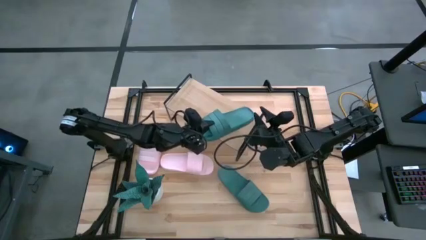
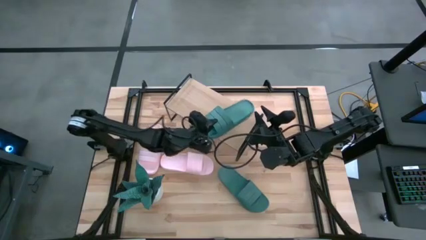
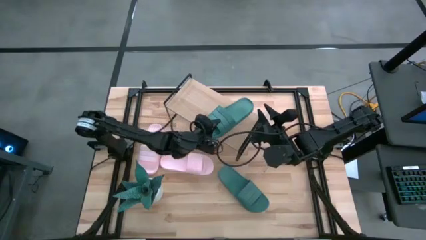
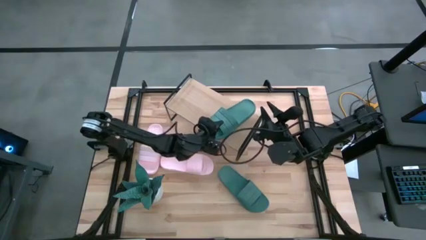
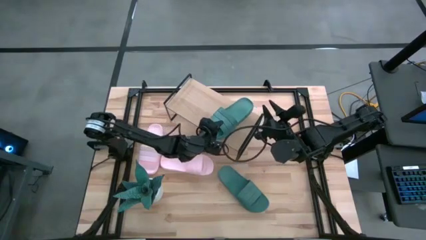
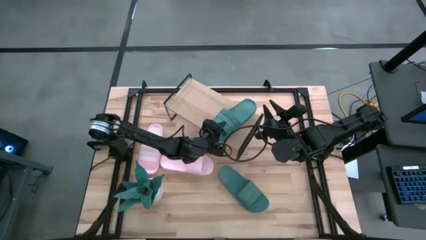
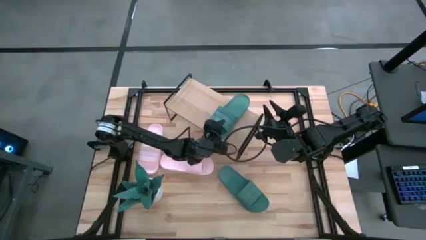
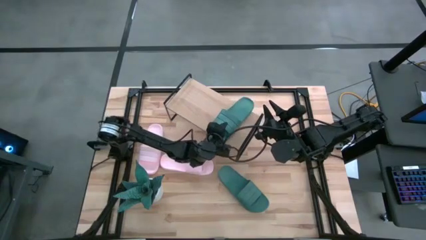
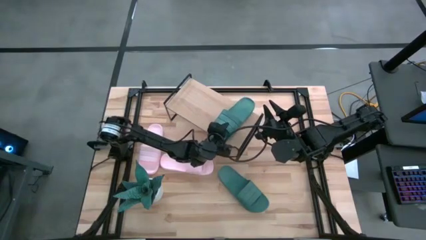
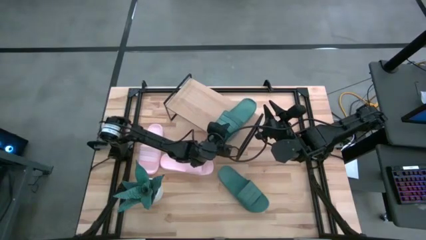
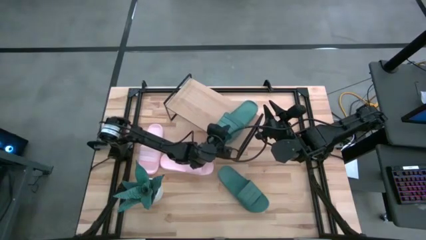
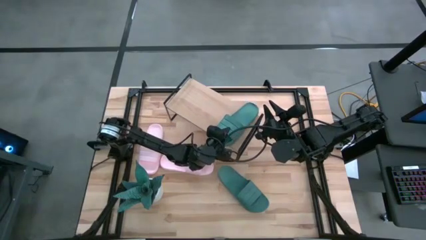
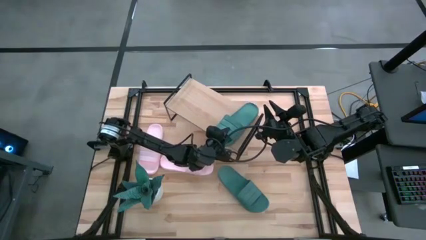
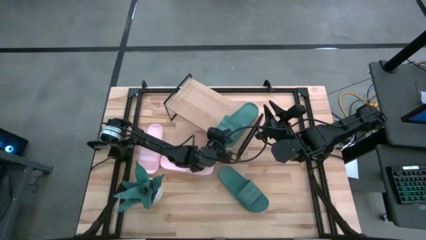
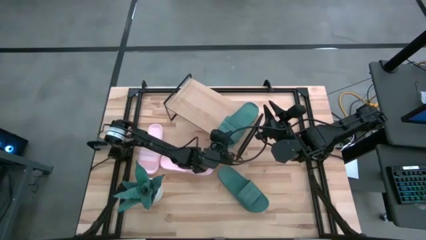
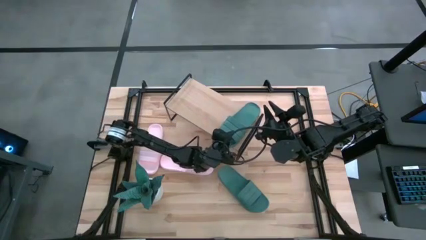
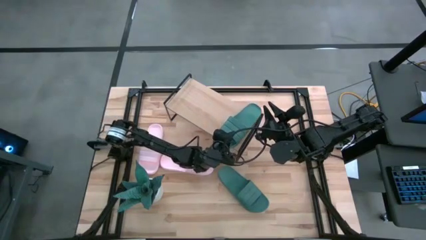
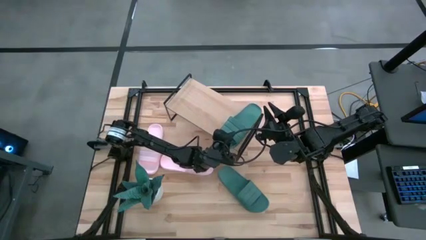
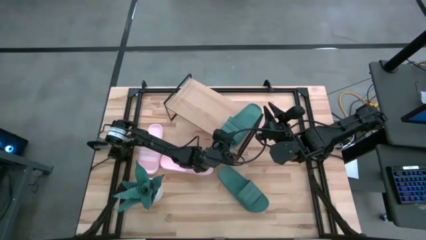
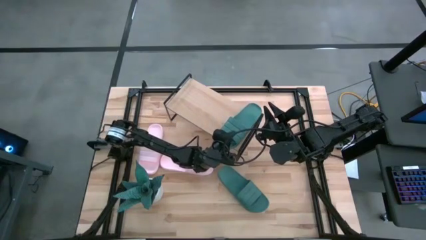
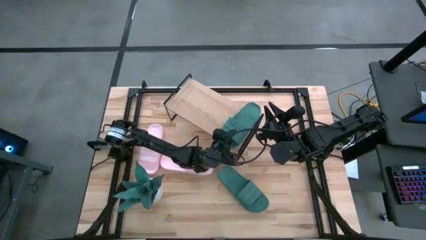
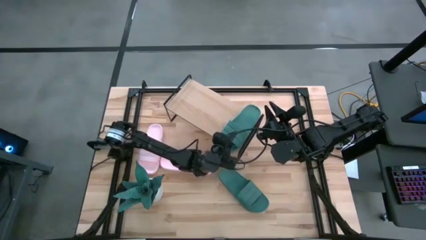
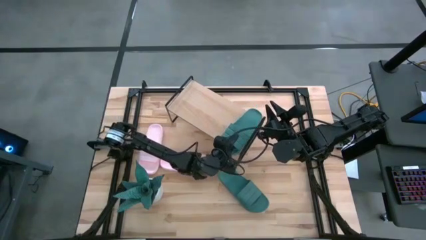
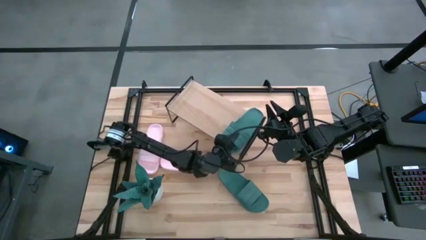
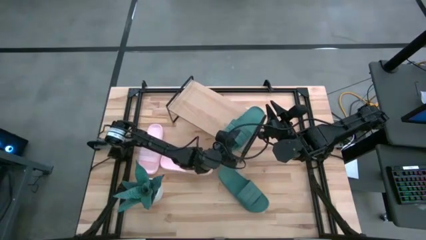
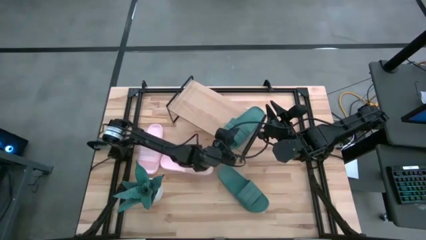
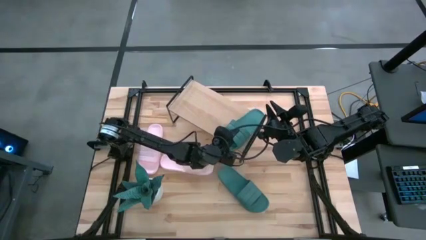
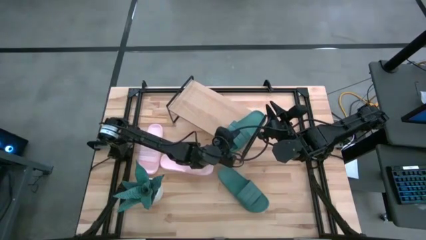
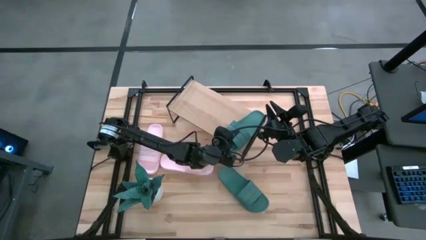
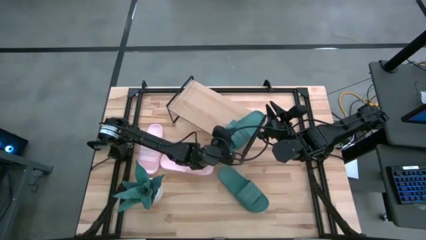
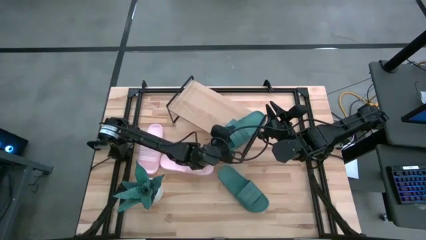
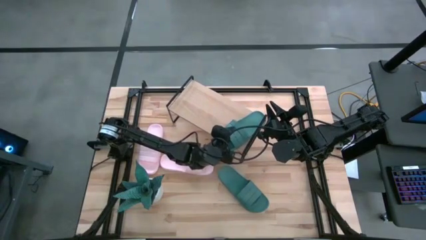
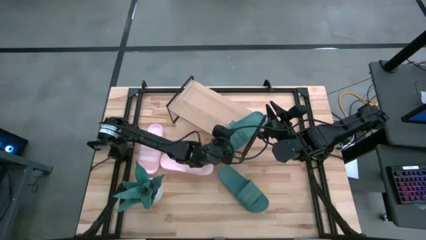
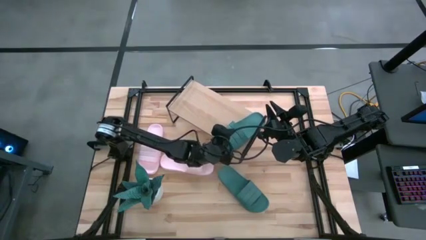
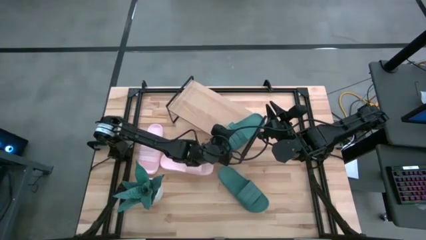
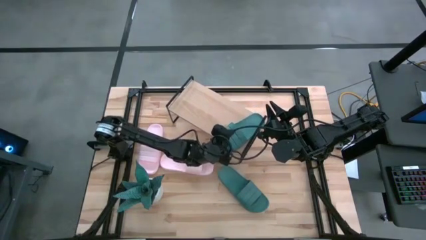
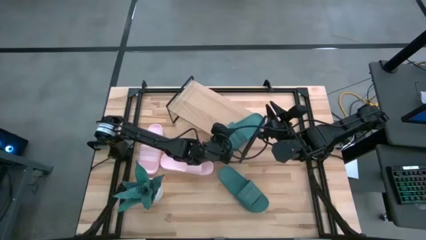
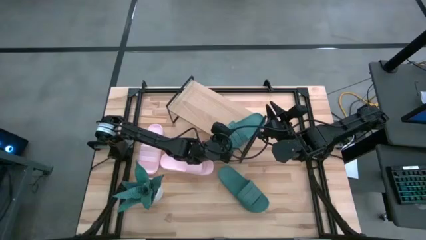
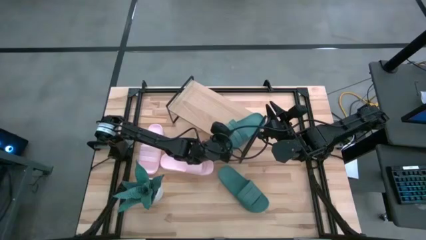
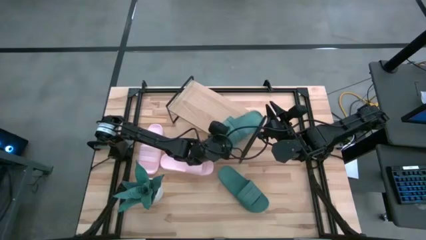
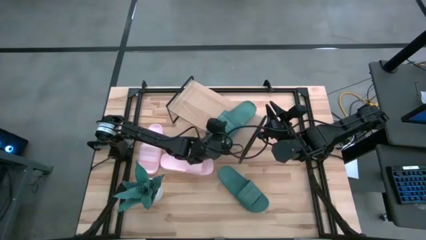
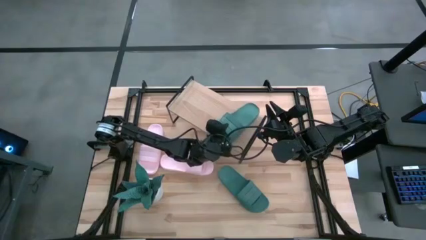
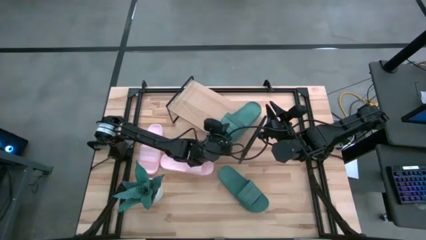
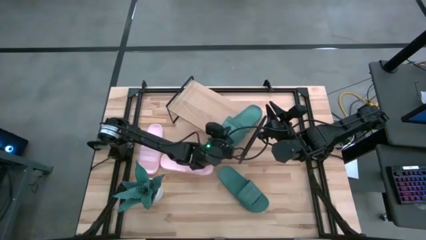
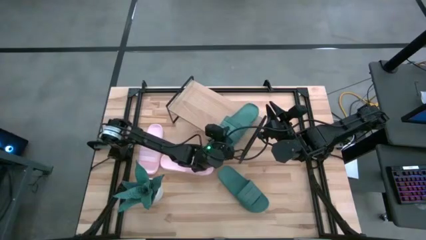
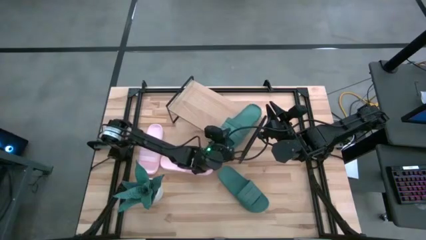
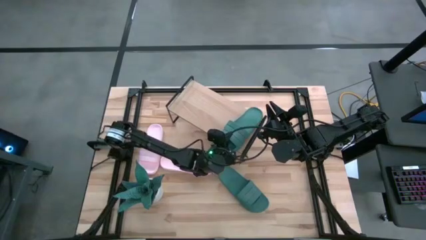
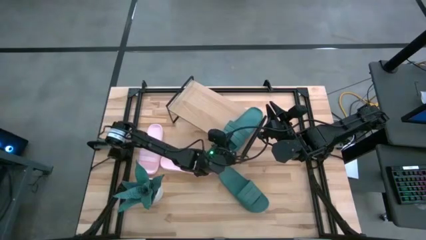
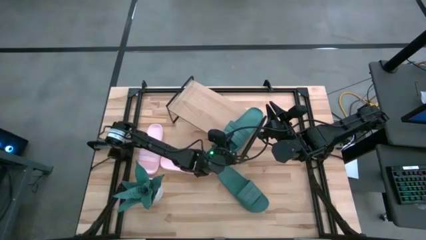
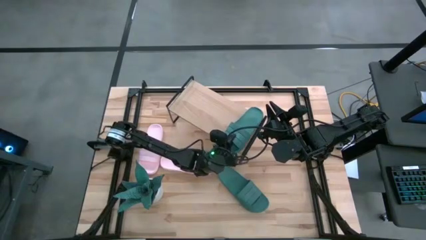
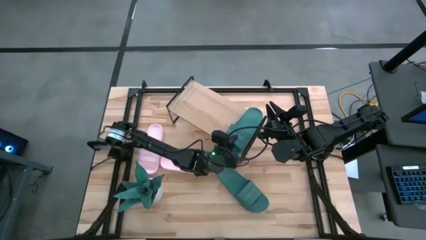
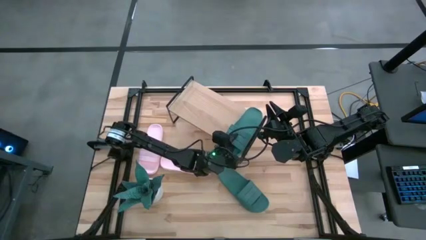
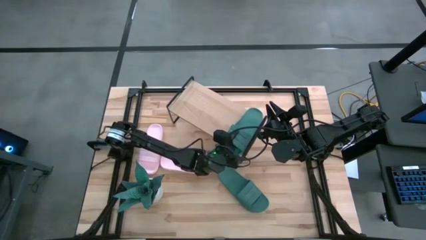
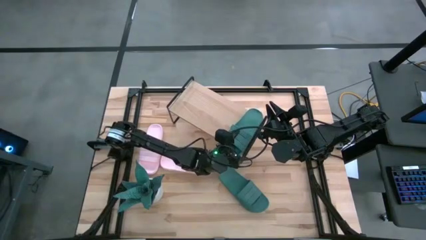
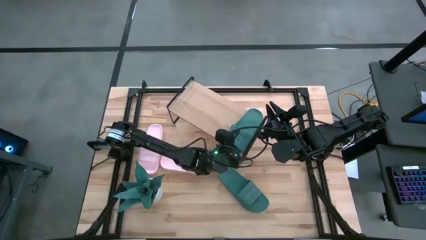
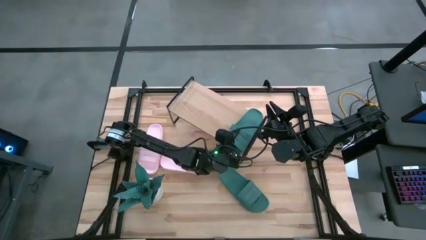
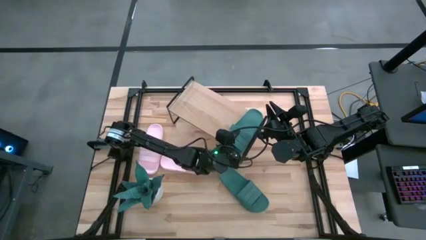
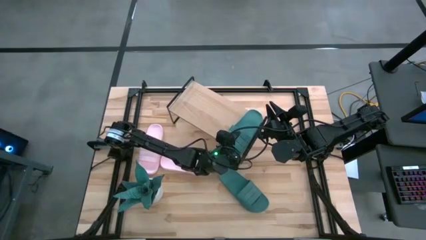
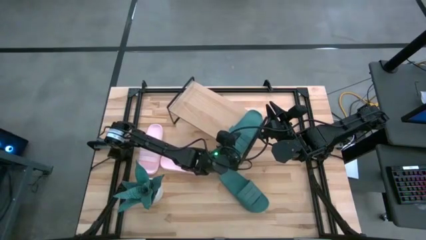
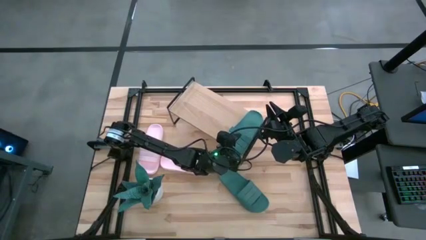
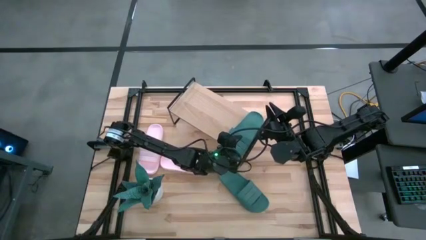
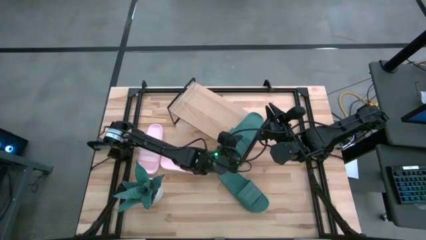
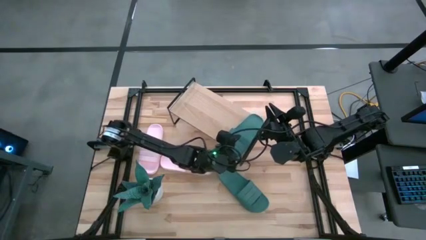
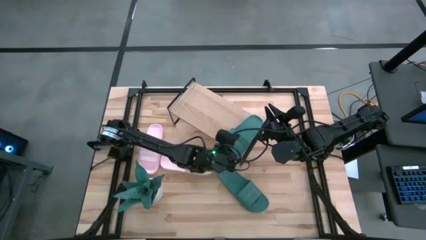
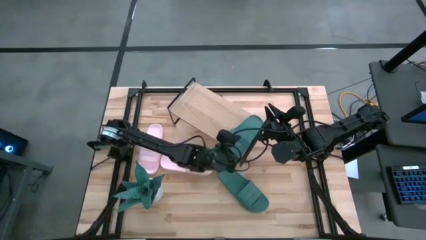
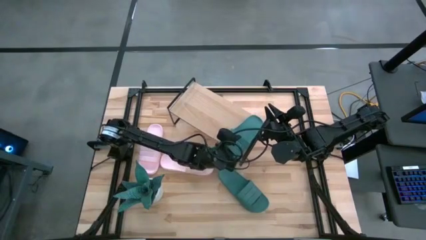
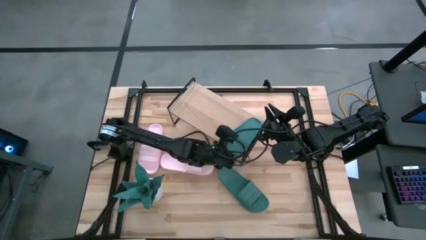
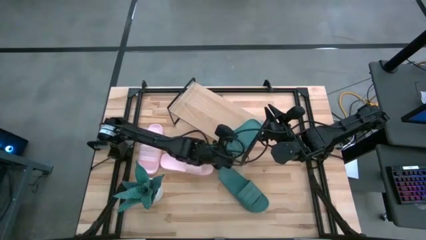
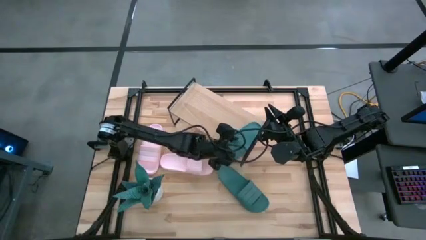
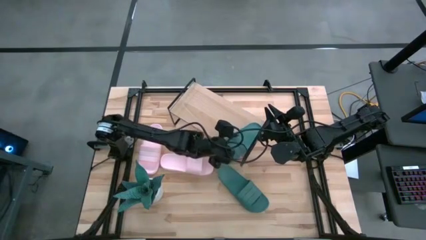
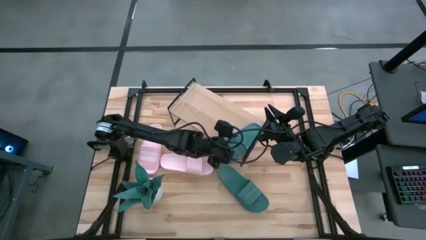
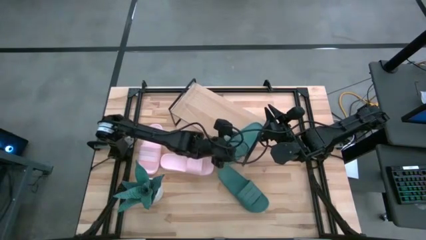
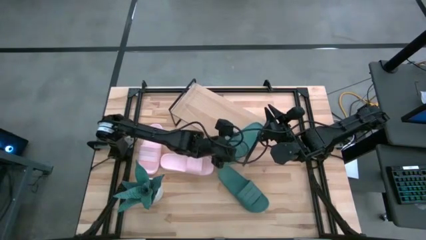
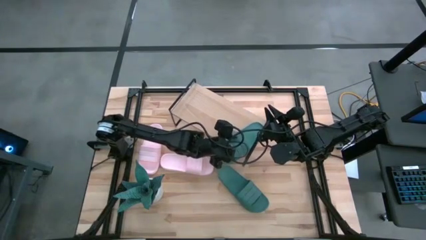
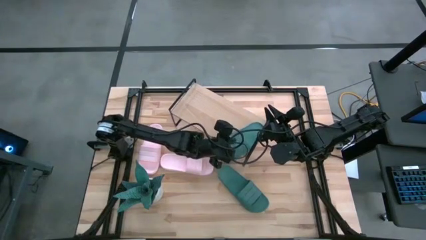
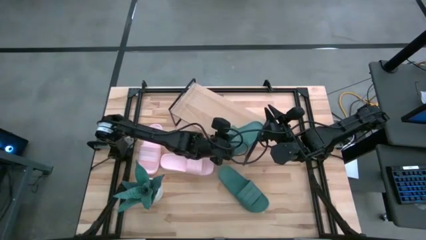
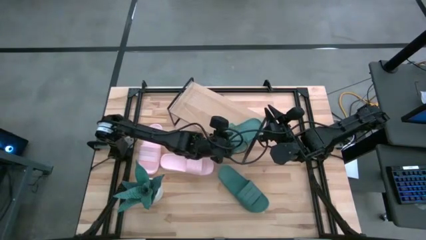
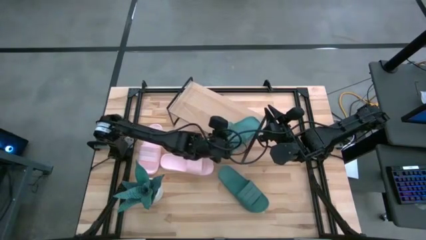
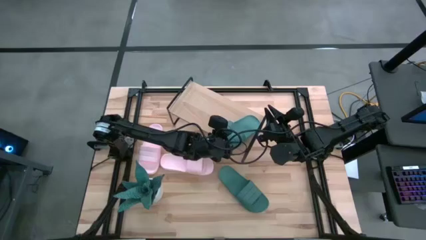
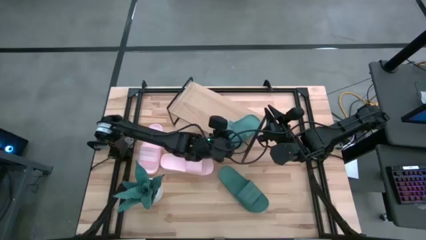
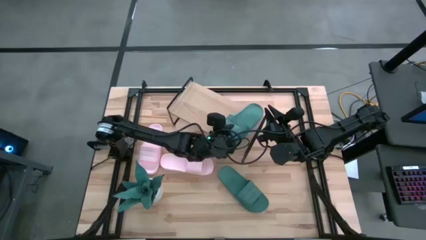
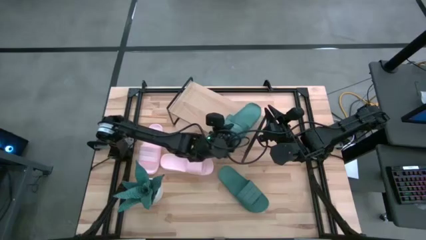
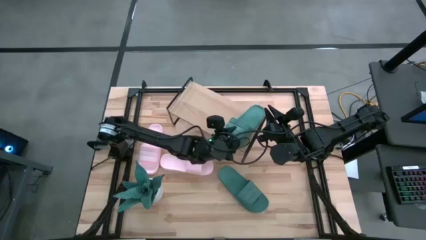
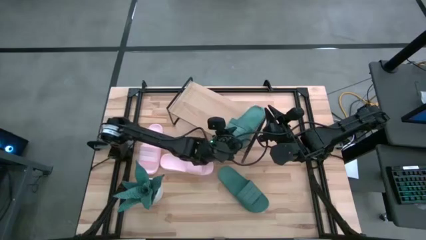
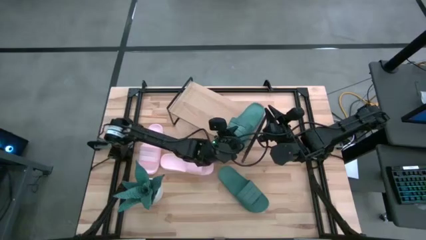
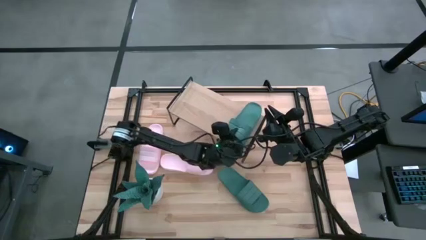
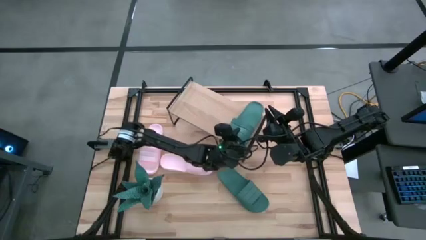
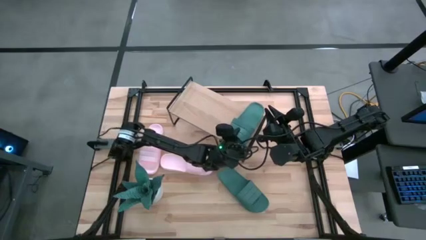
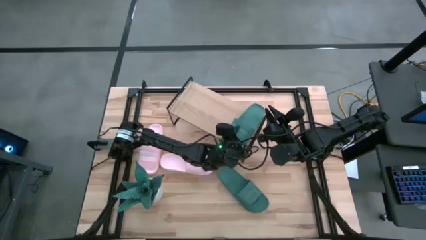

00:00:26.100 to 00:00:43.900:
Task: Pick and place slides into the shelf
Put the right green slide on the shelf
